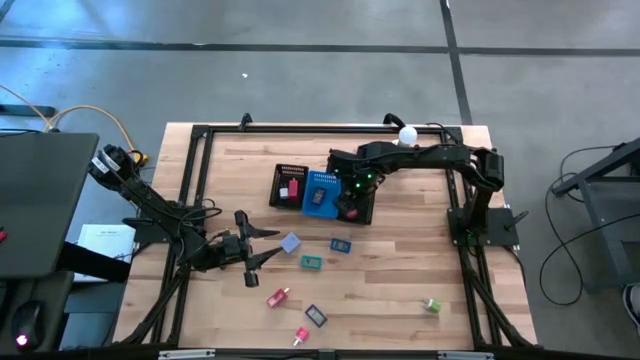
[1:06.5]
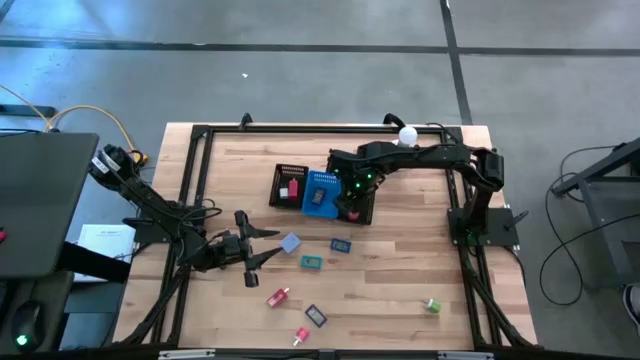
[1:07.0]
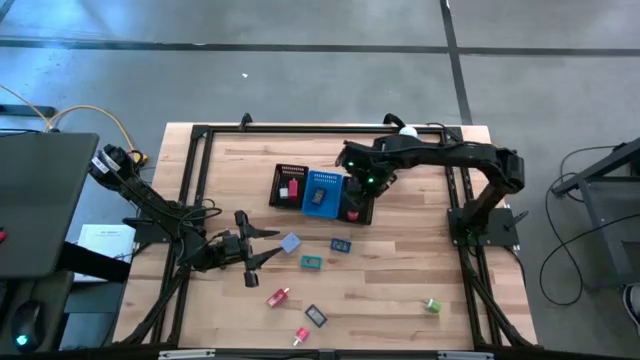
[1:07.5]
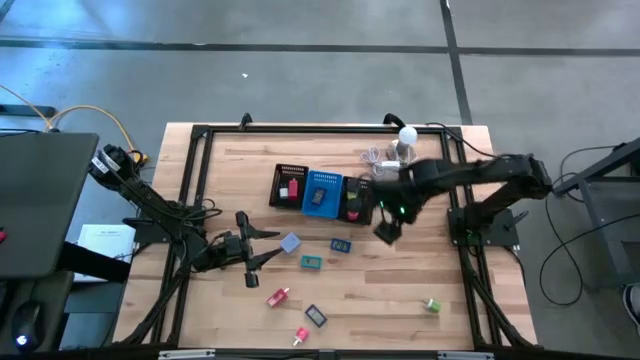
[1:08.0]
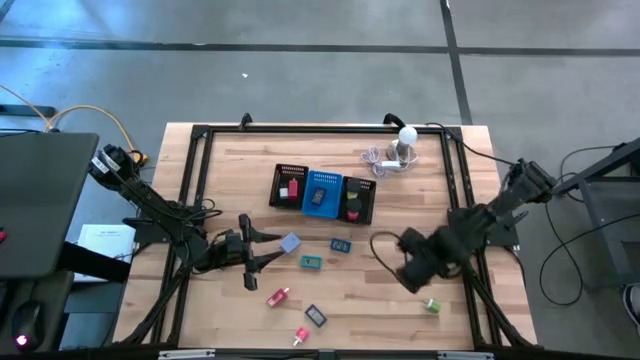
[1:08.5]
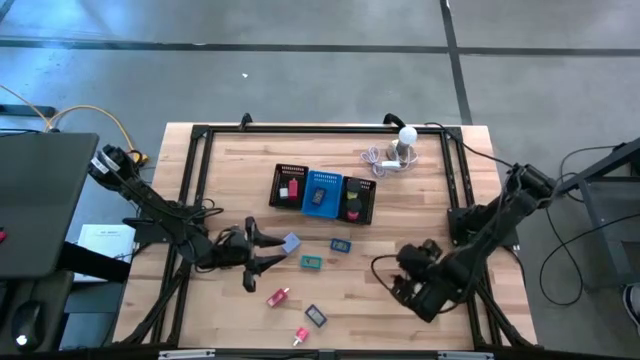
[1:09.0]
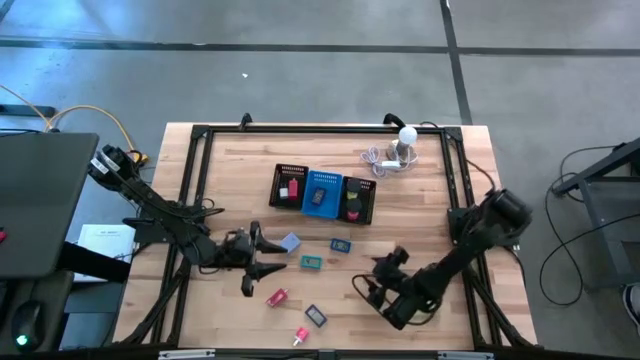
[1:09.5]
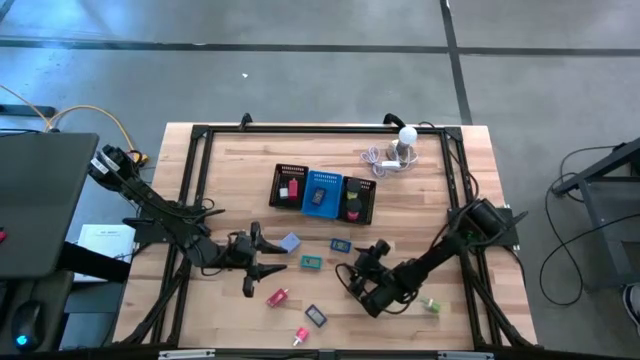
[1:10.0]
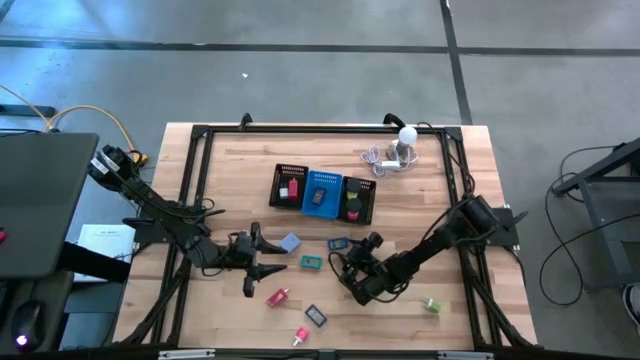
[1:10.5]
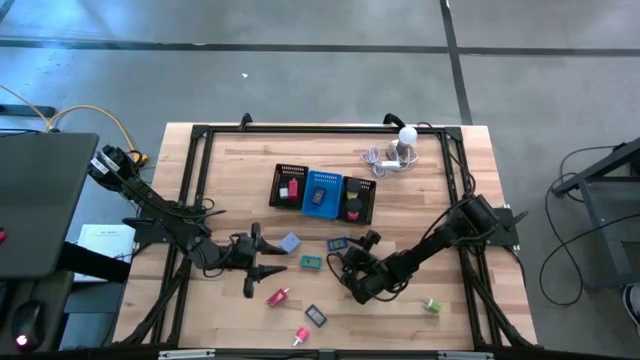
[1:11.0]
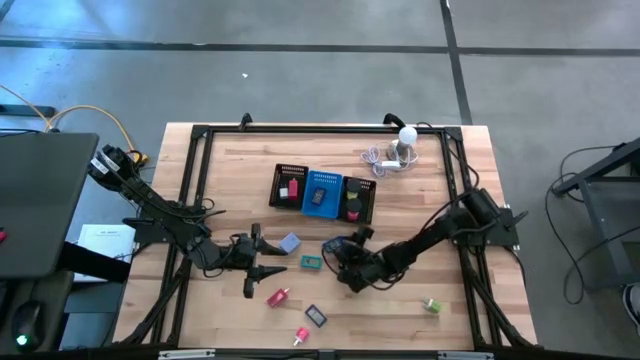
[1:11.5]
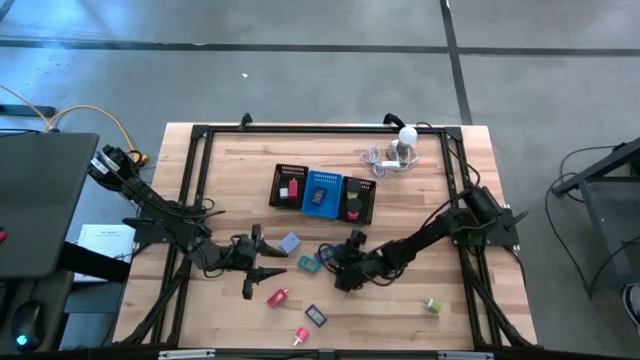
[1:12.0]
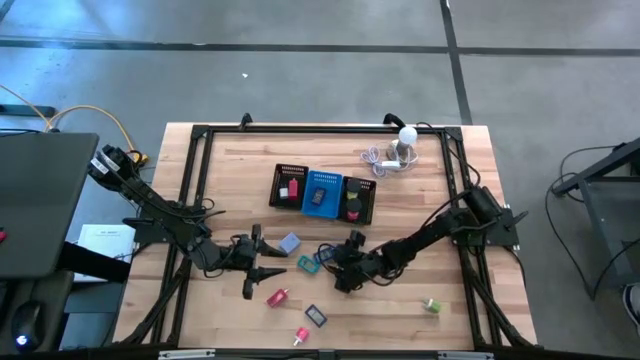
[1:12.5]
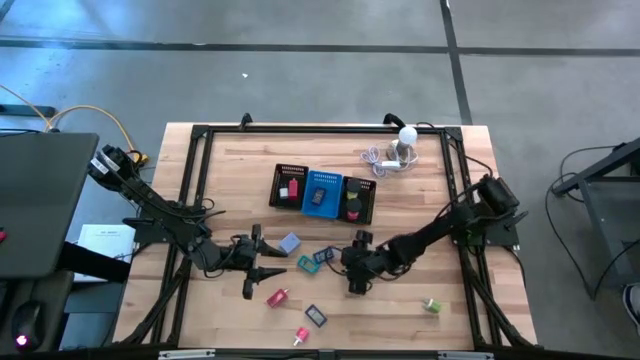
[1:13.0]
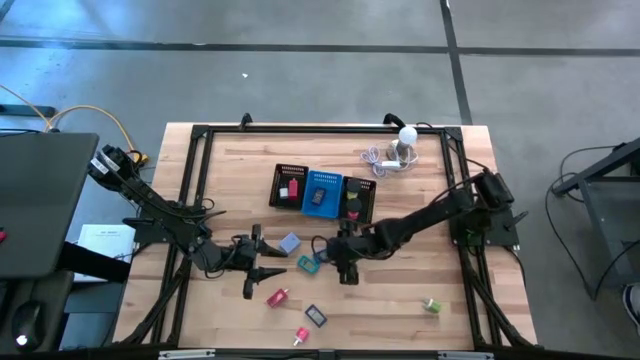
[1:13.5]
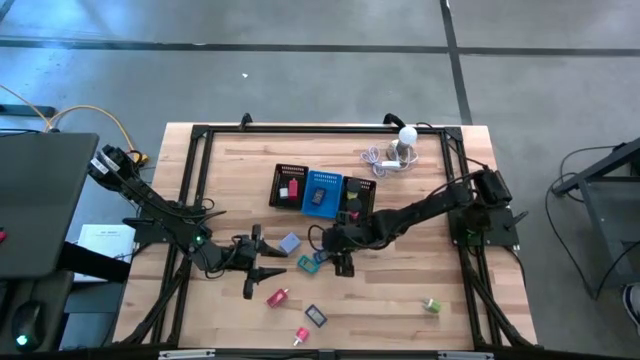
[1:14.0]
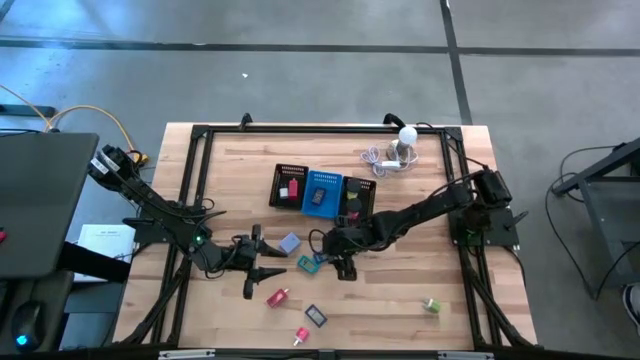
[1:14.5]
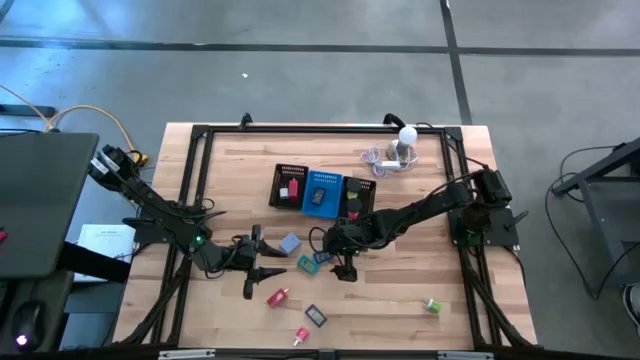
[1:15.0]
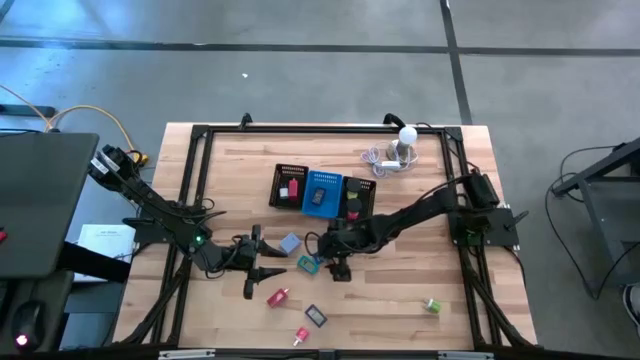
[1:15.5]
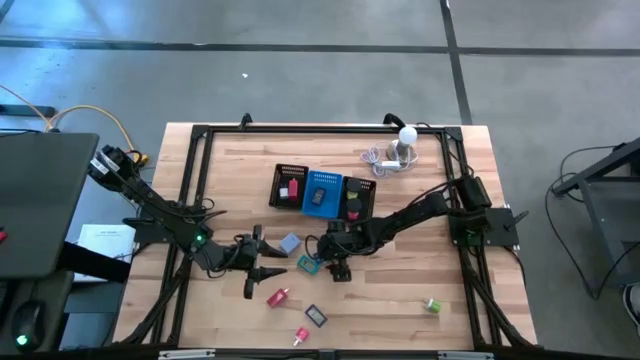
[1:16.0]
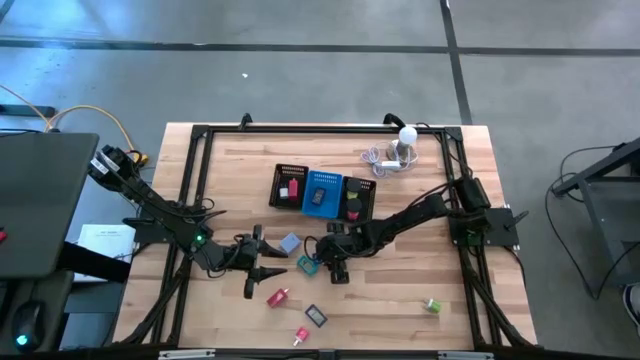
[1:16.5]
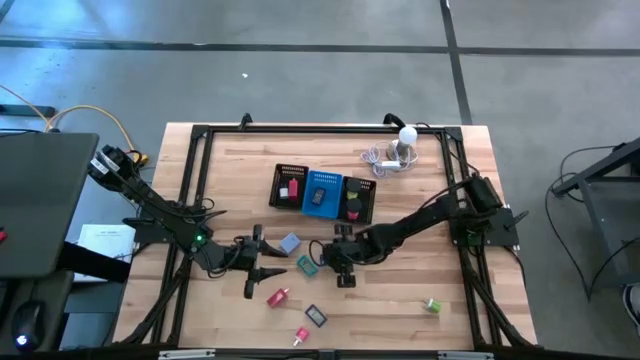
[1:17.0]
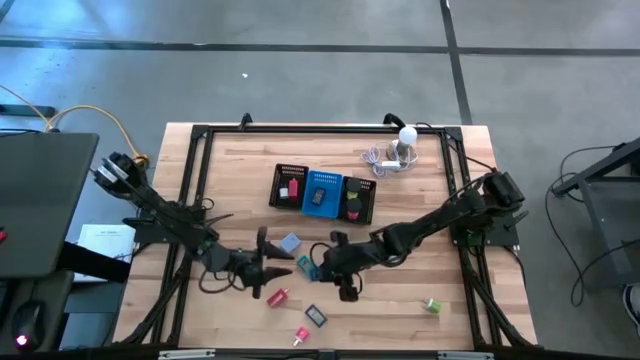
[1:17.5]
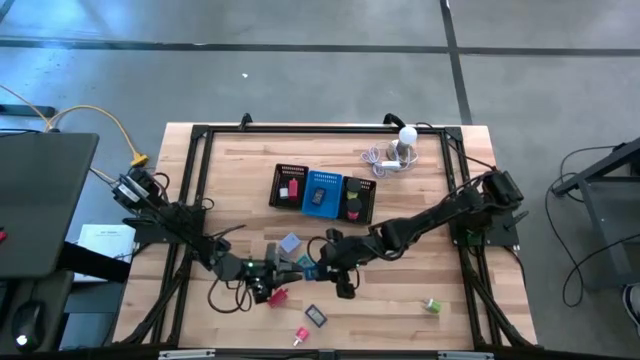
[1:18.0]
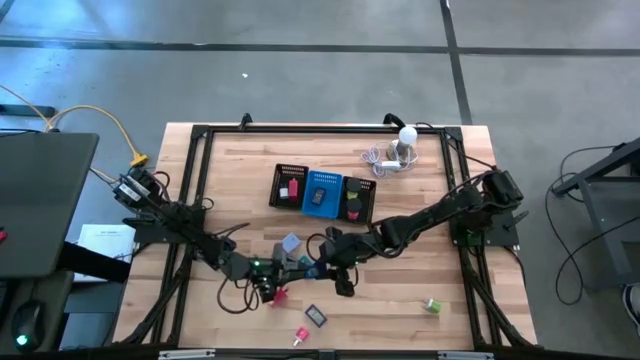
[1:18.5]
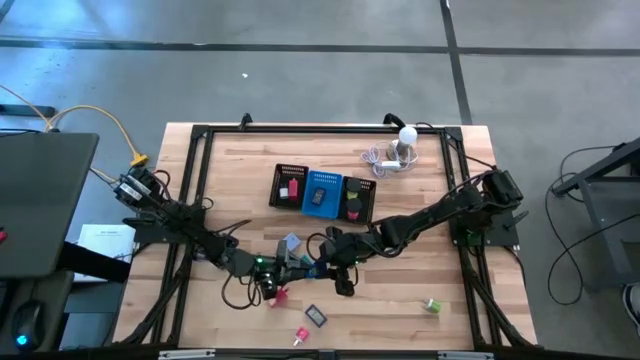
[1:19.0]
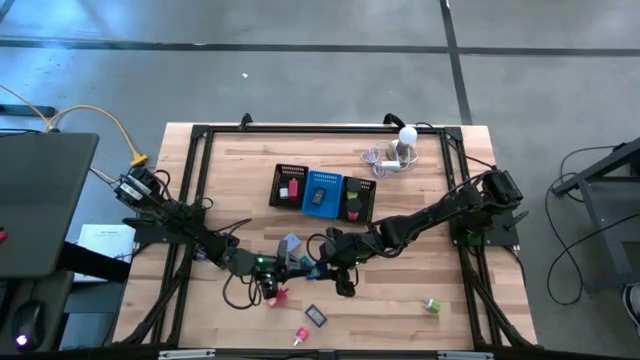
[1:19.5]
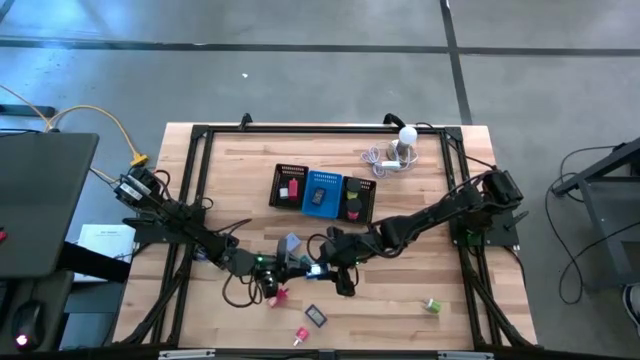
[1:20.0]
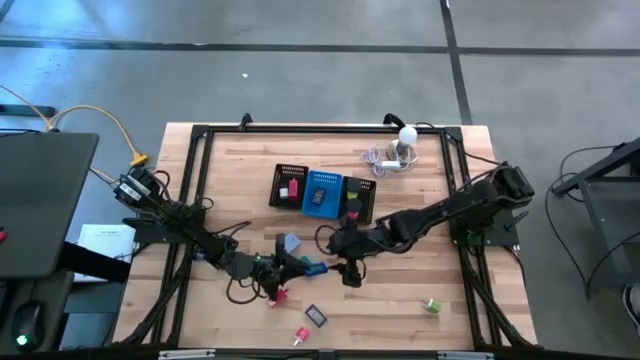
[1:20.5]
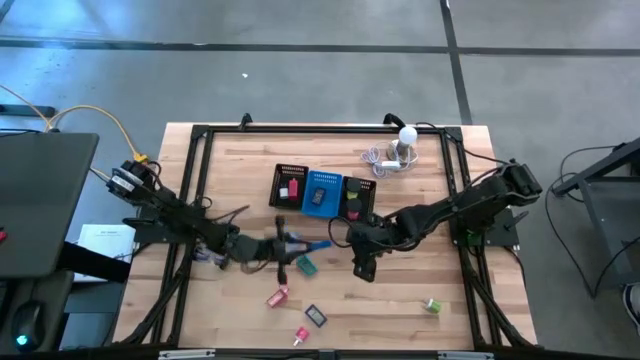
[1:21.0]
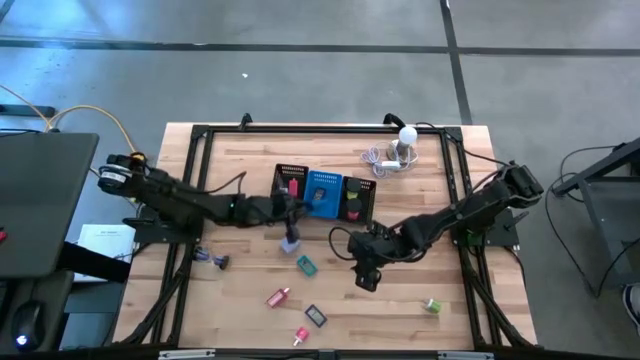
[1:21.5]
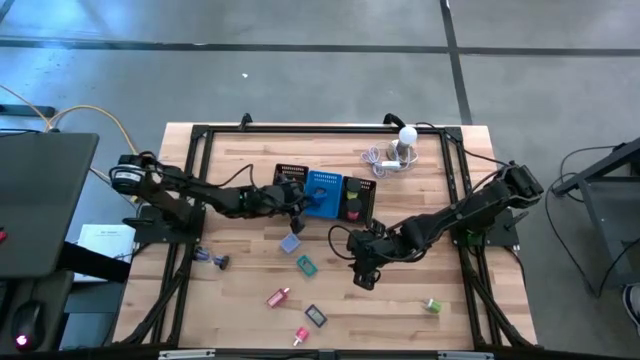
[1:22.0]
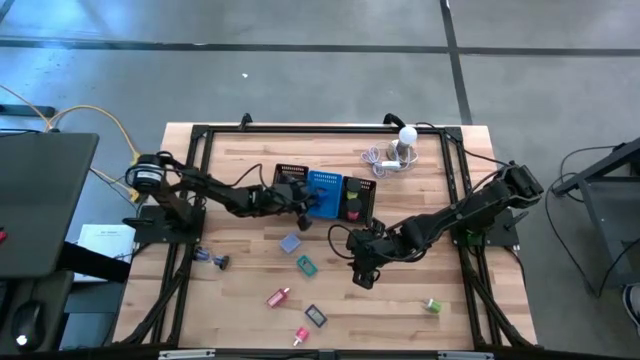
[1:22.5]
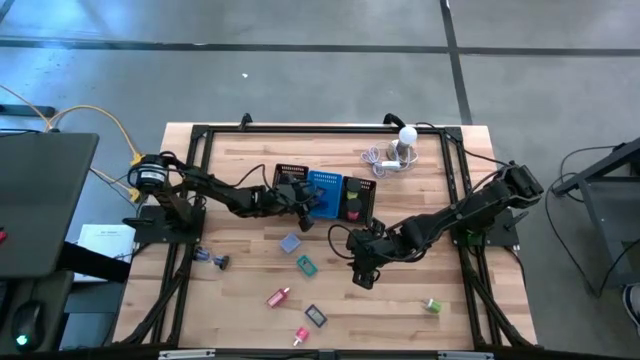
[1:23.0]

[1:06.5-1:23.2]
Task: Pick & Place Office items
Put the blue digital clock into the blue bin

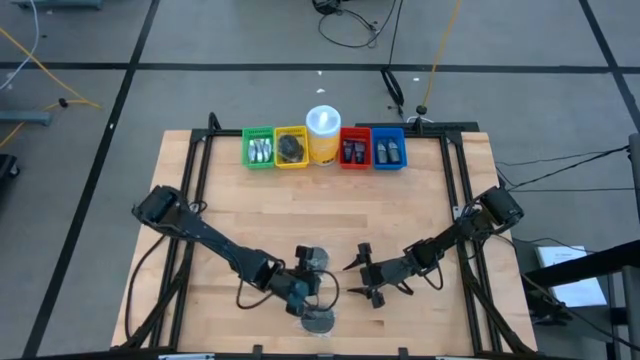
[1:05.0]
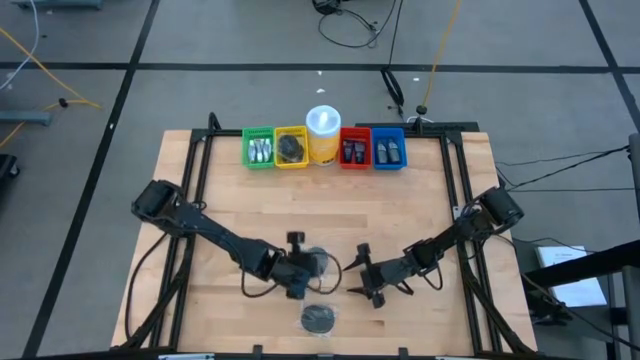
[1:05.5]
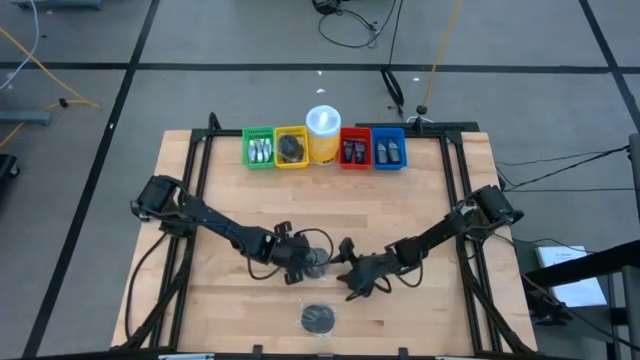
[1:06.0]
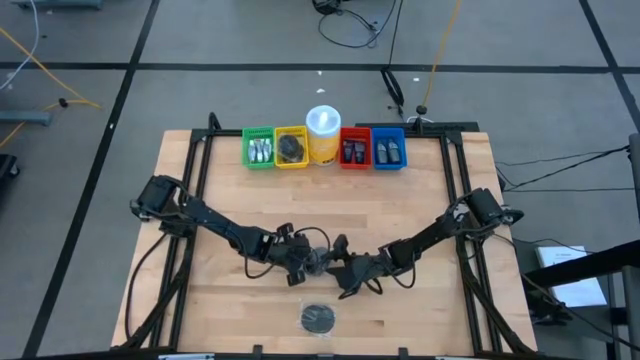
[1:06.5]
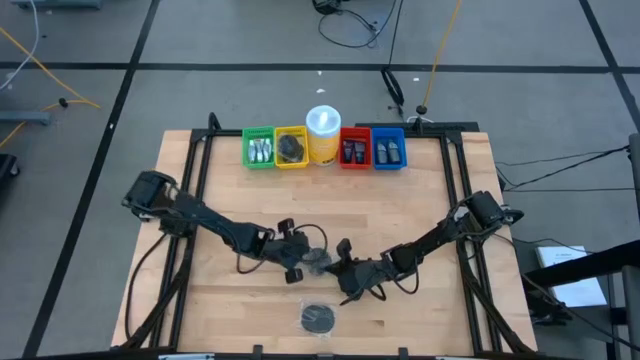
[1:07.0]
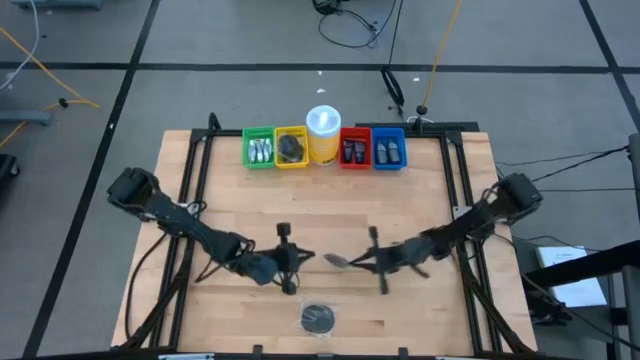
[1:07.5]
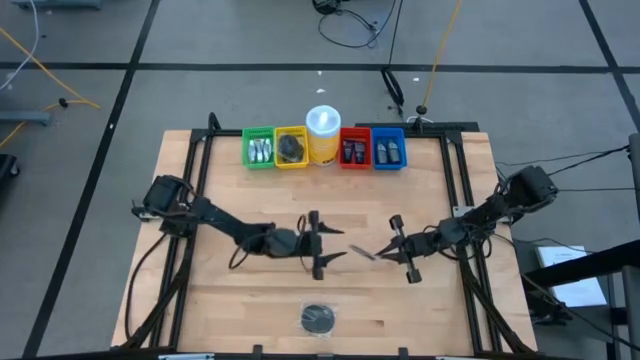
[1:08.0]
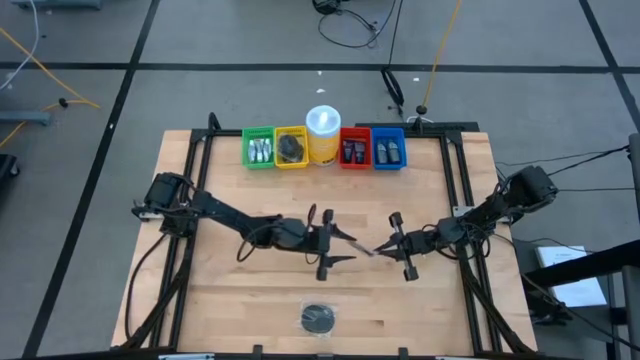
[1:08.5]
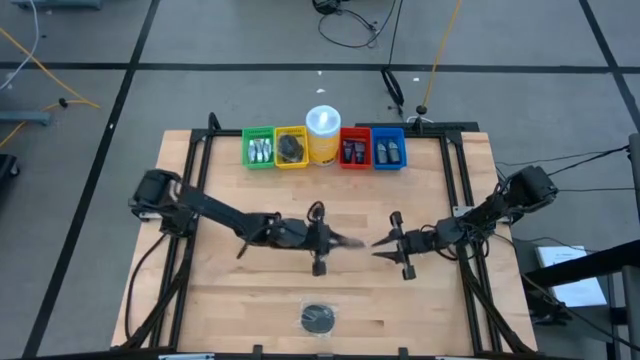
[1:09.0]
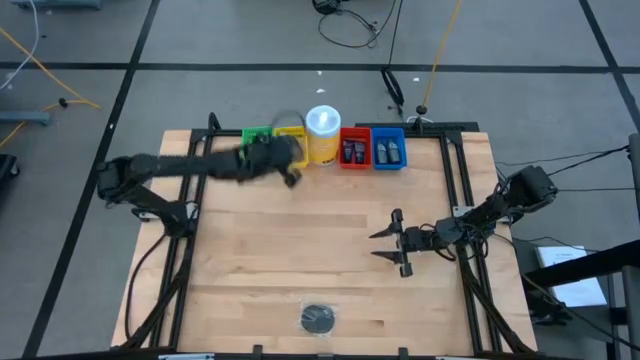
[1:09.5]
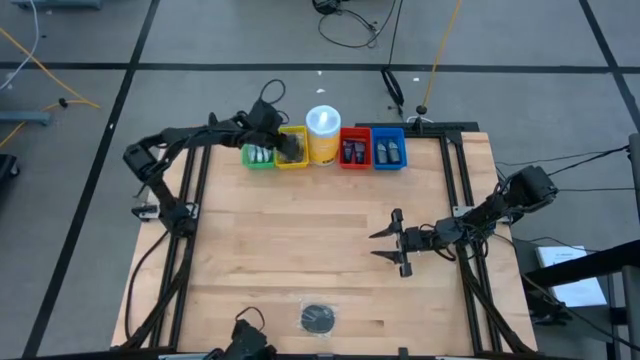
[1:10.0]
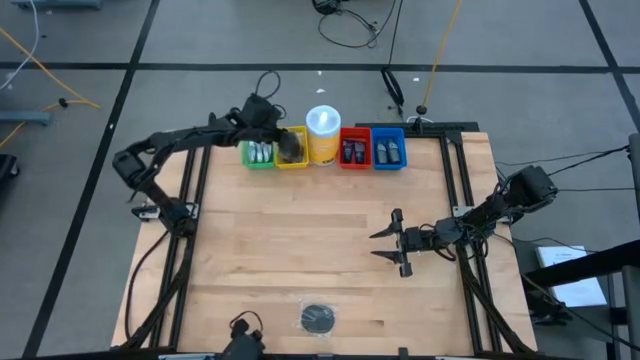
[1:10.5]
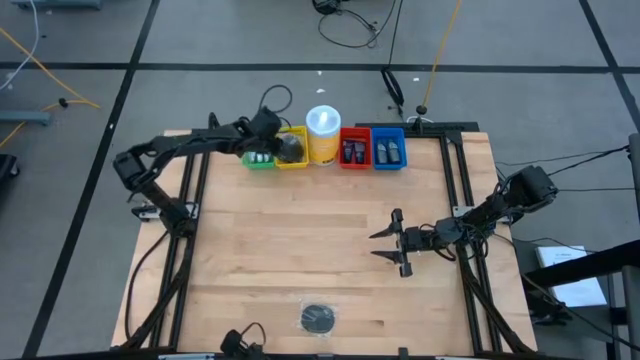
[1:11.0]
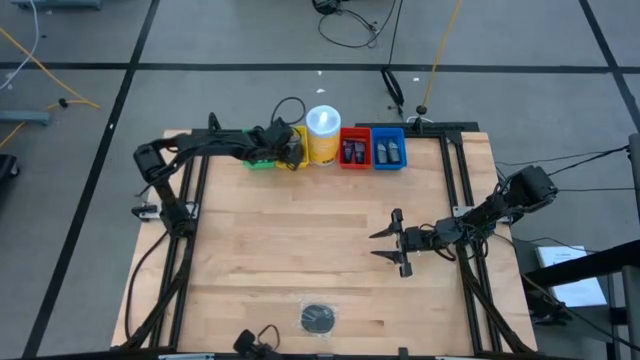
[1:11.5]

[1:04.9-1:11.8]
Task: Pick & Place Travel size toiletries
Put the black hairbrush into the yellow basket
